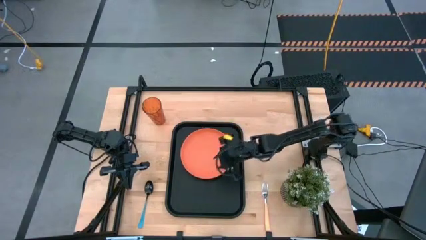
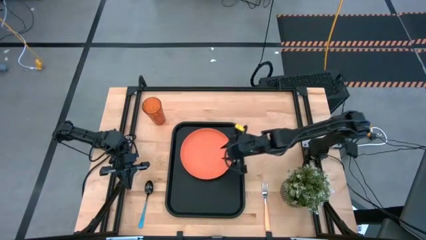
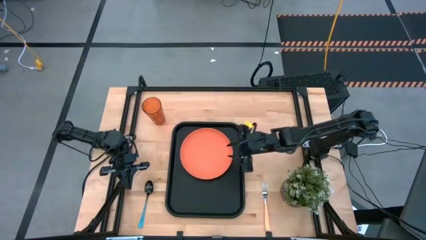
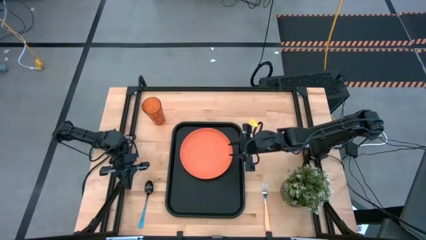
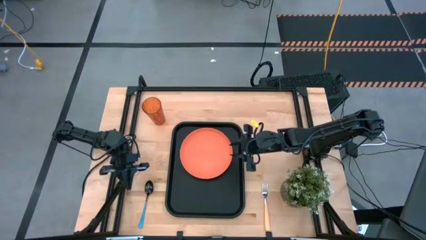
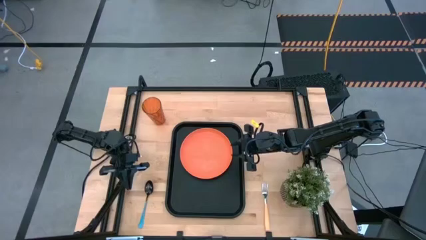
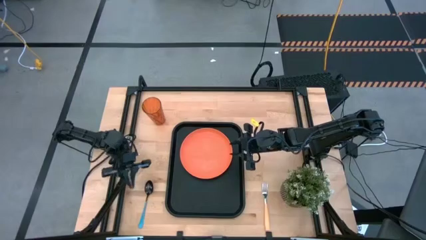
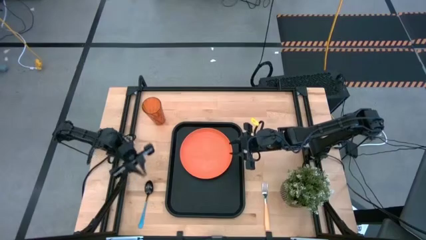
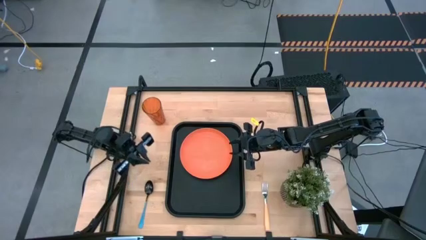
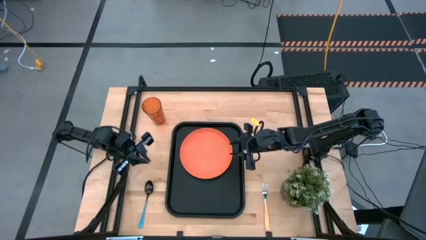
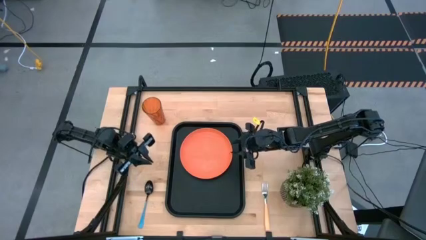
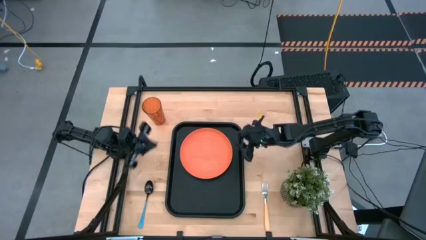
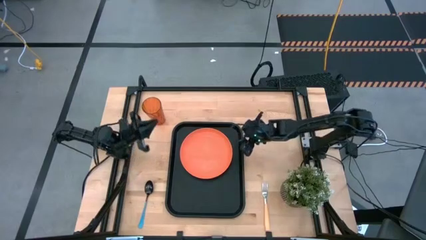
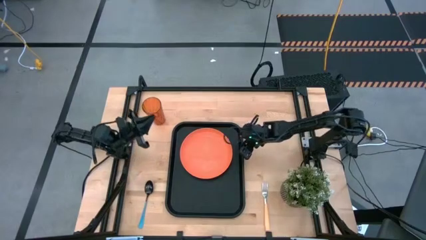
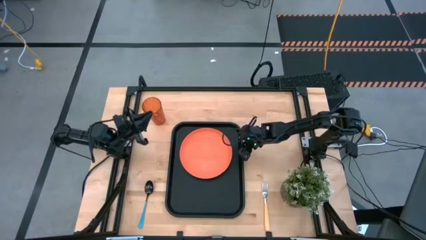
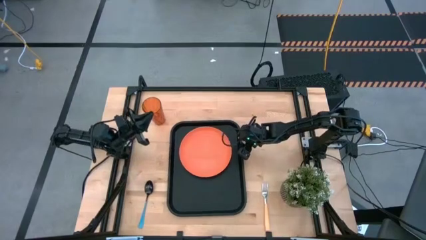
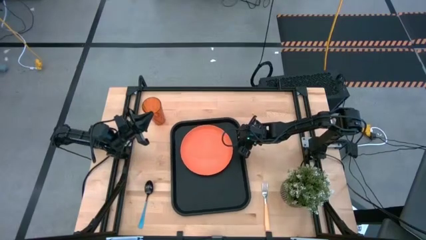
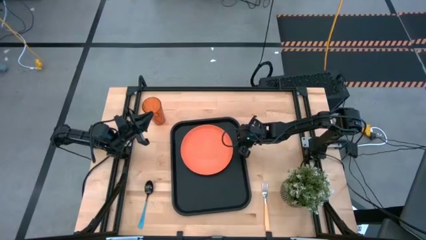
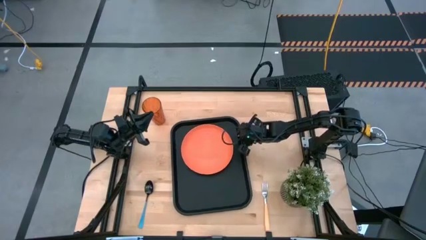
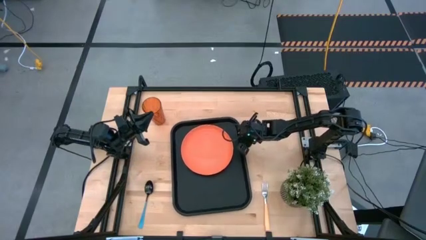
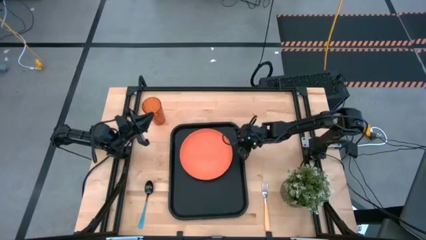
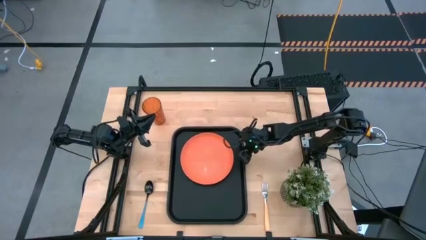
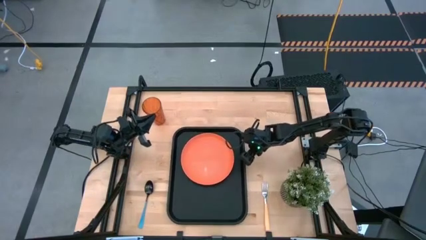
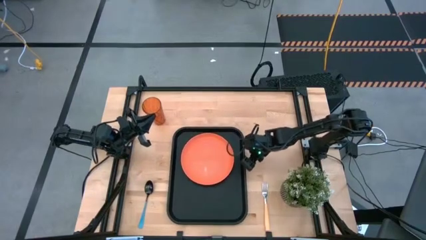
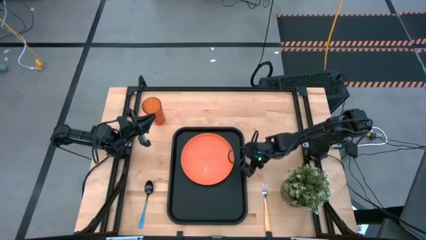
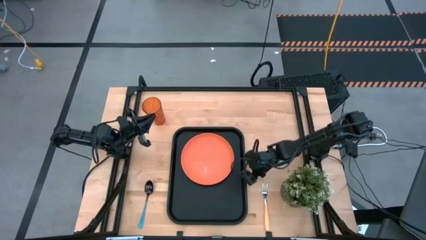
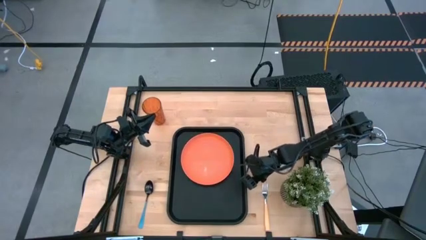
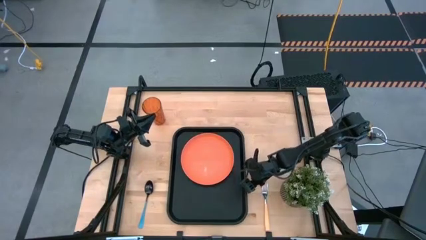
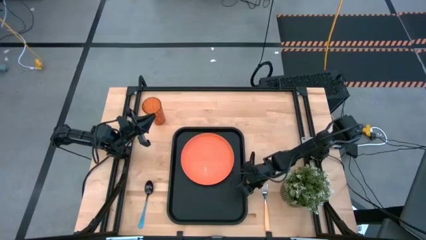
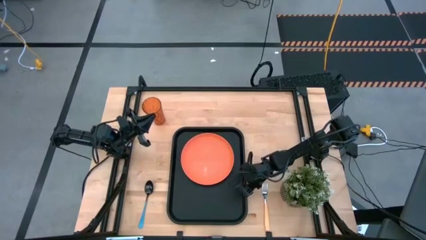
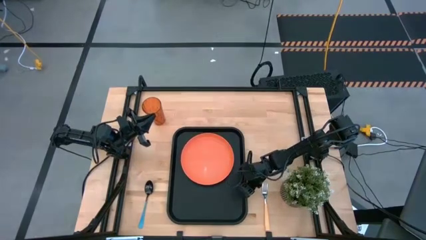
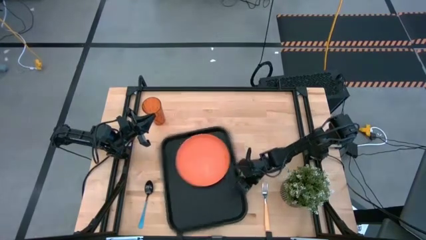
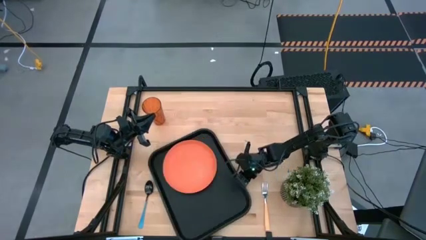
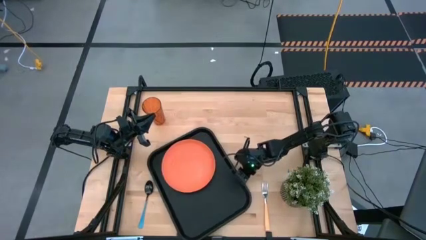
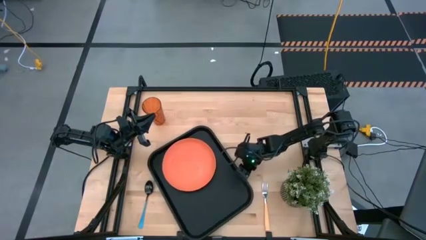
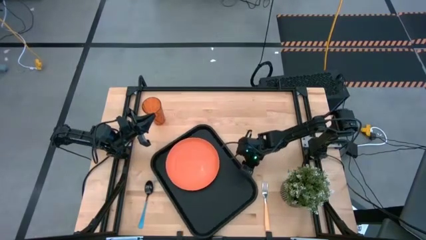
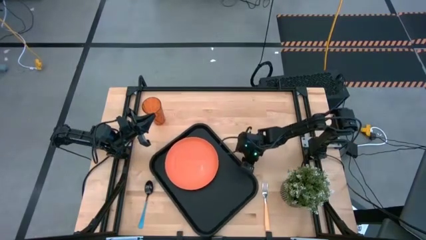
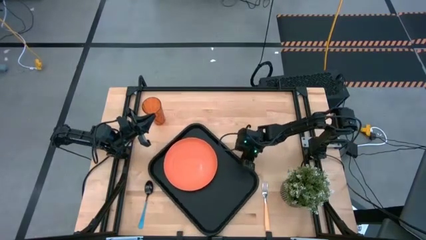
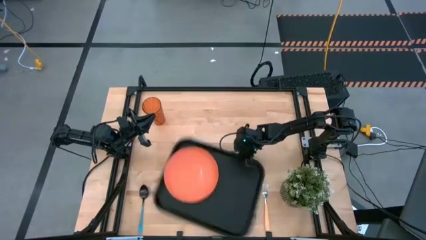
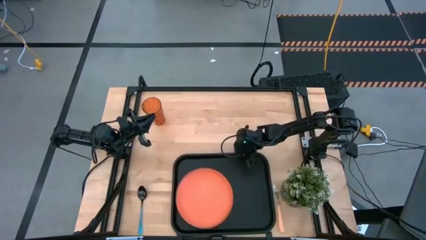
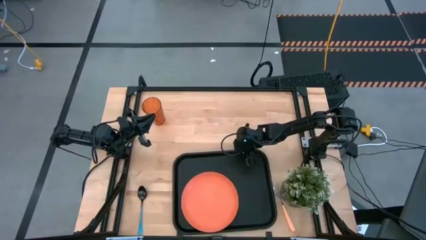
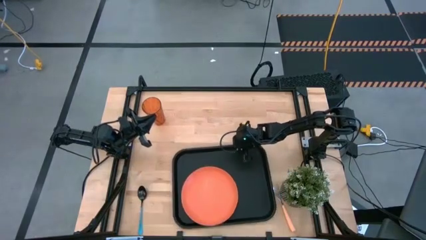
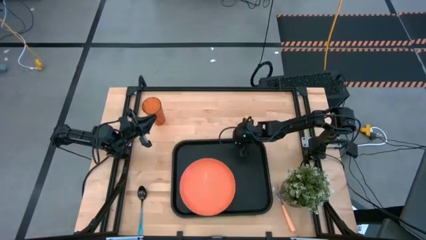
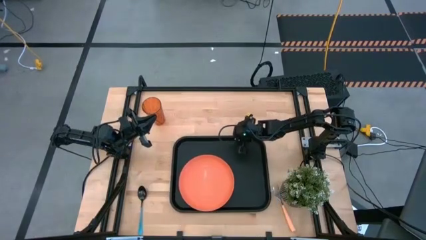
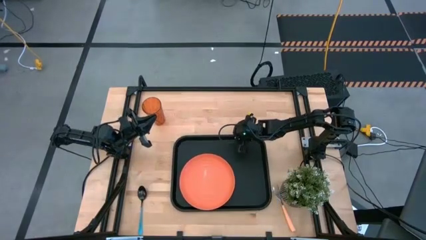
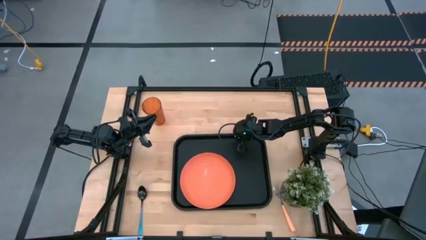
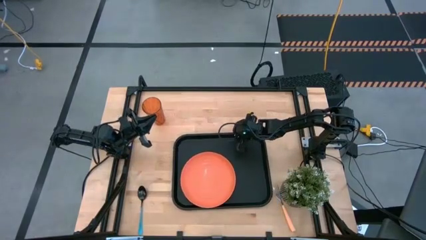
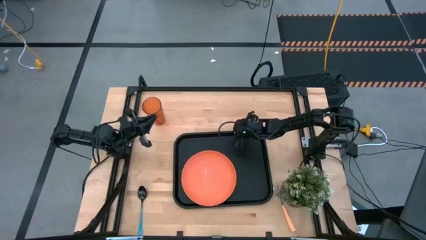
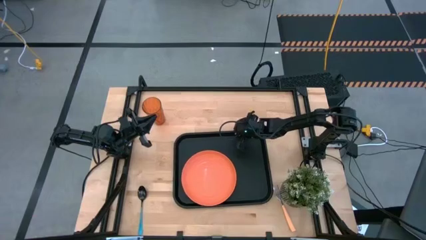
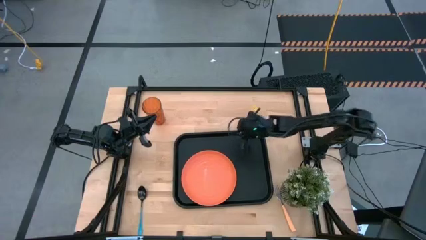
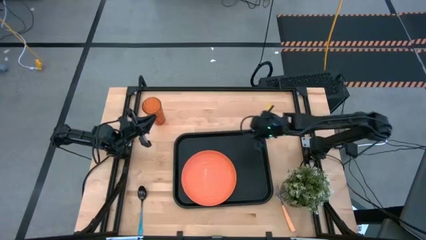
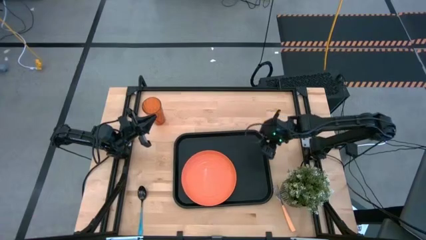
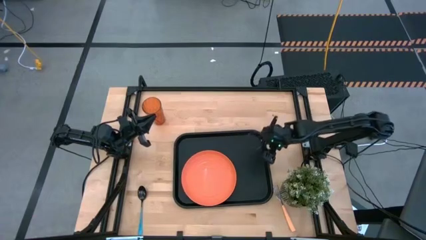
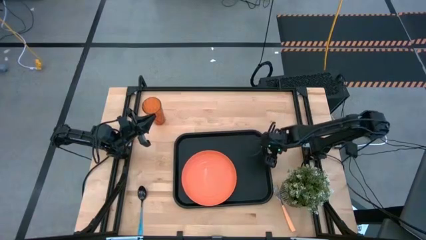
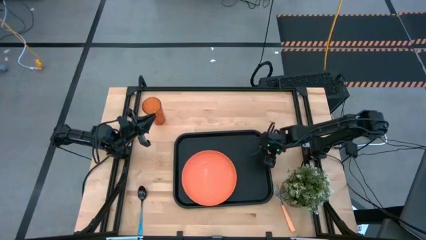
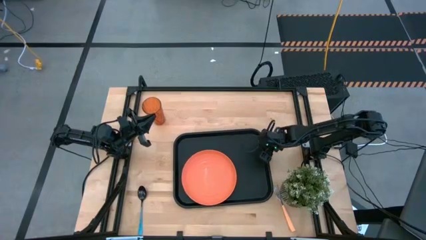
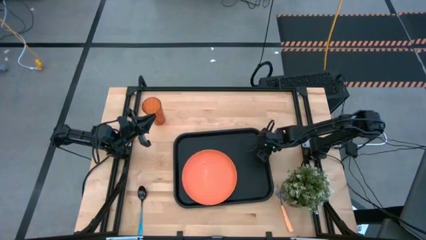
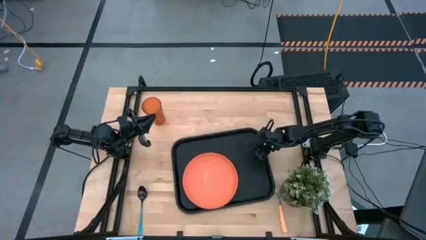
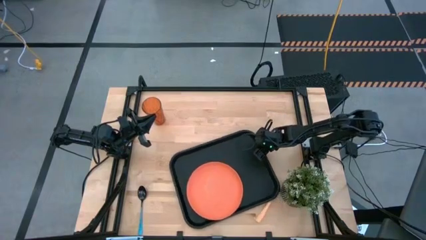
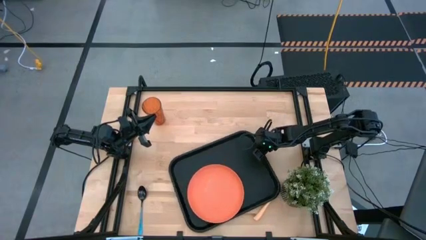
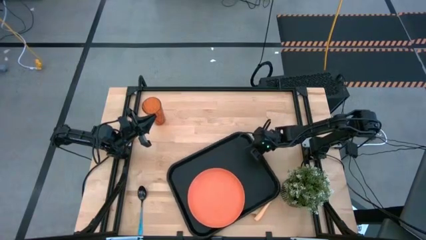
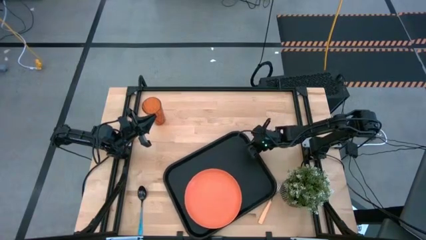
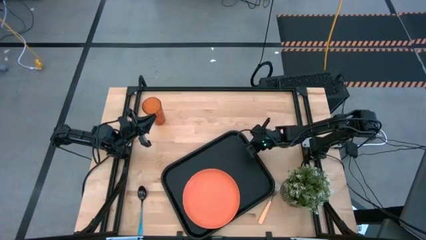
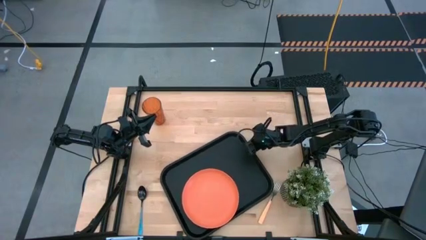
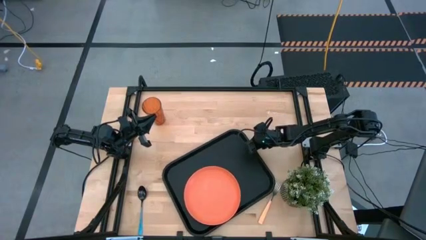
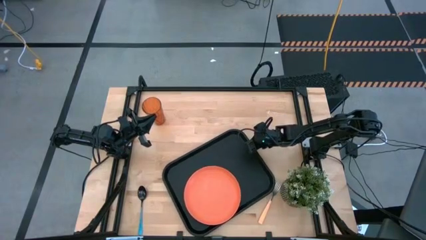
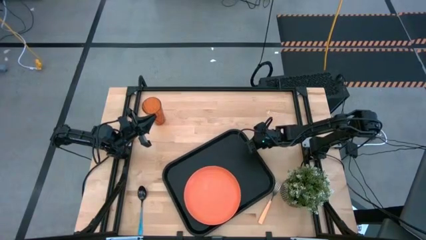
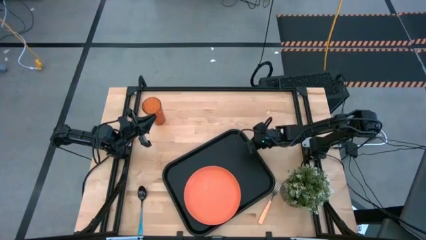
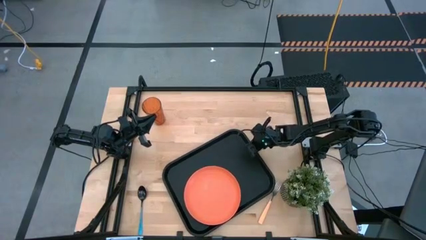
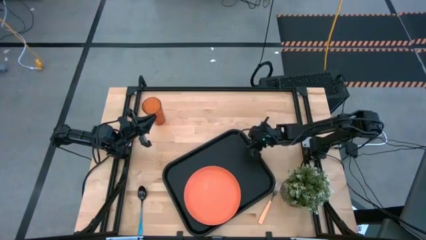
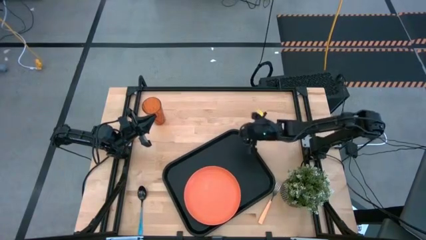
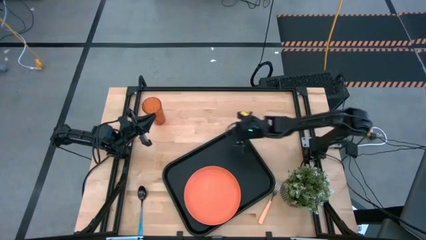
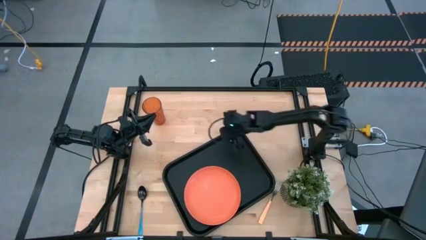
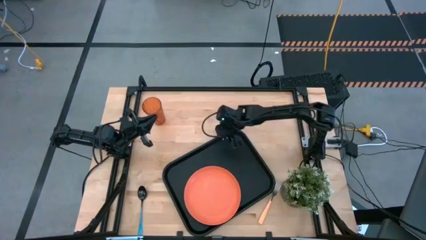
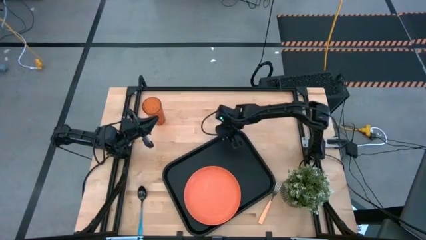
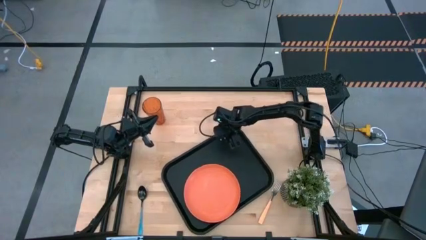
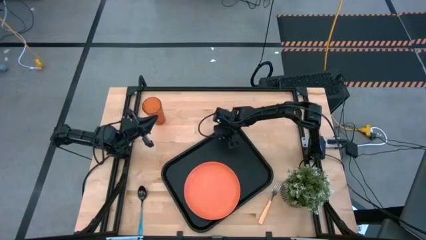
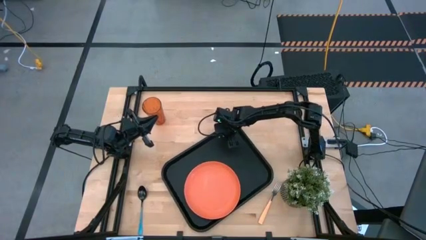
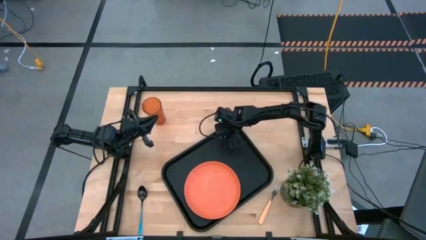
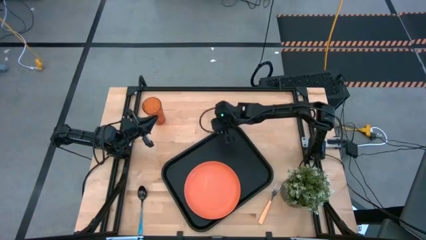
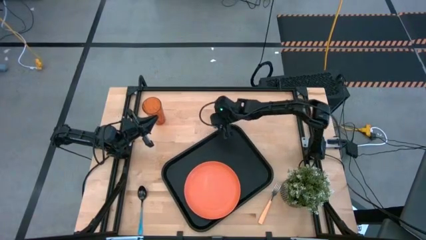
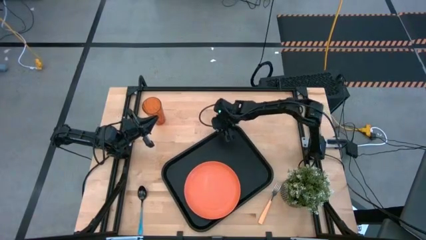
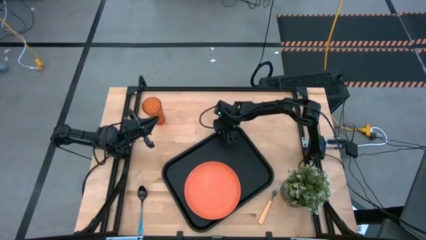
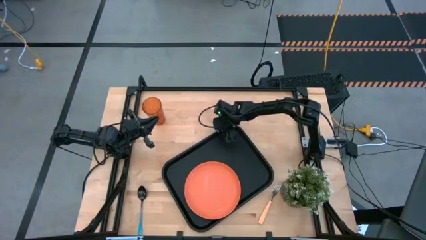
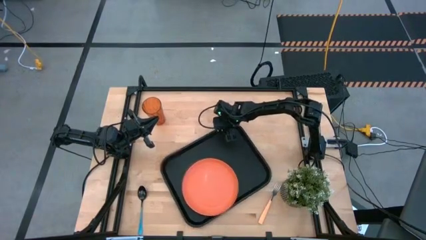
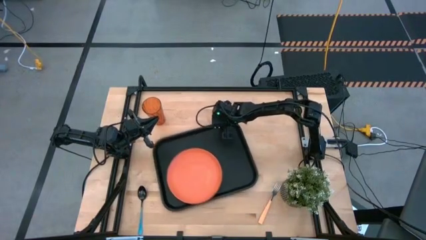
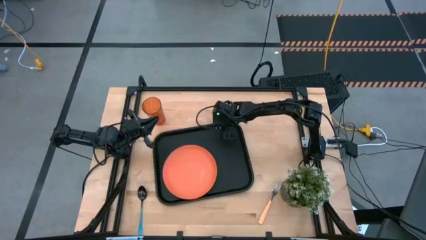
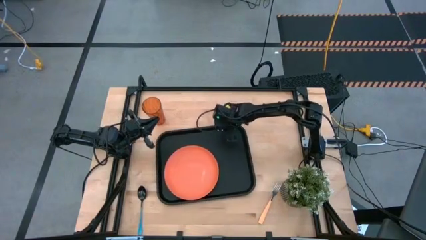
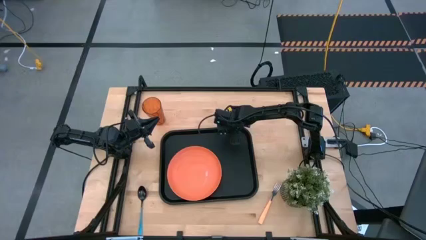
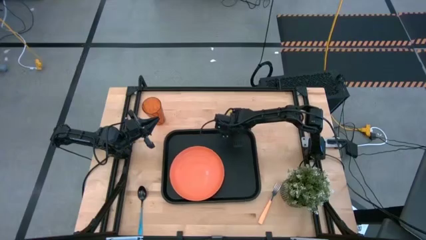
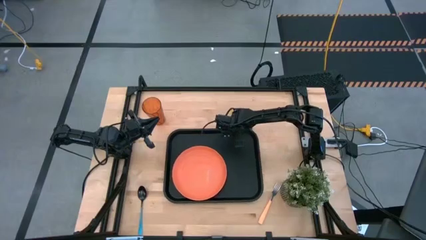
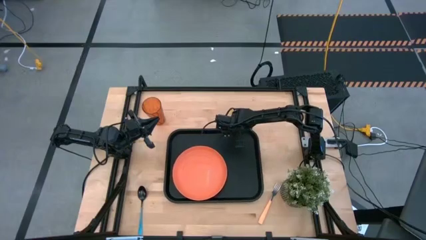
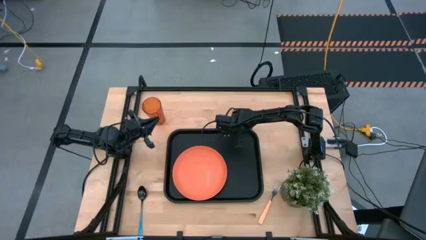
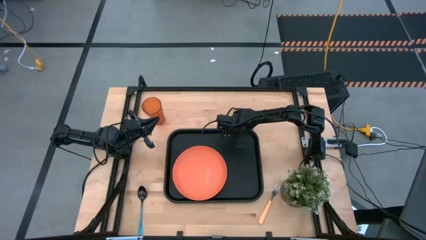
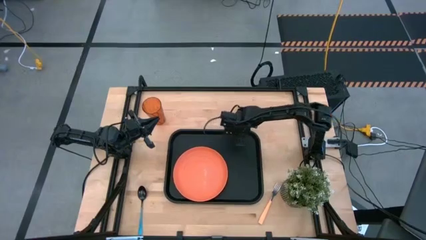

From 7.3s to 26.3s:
Task: Pick and place plate/cup/fork/spoon on tray
Adjust the black serving tray
